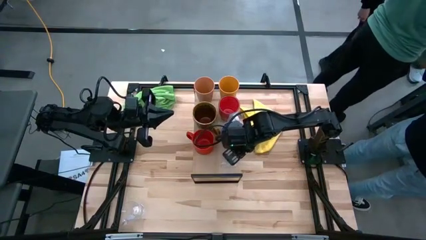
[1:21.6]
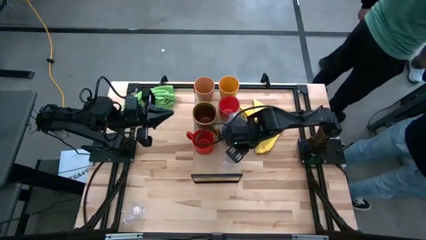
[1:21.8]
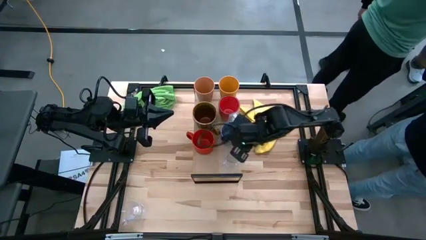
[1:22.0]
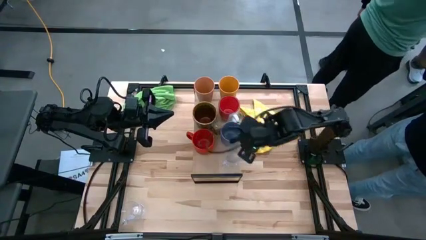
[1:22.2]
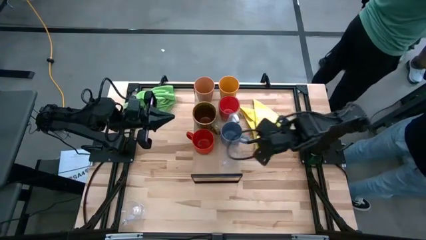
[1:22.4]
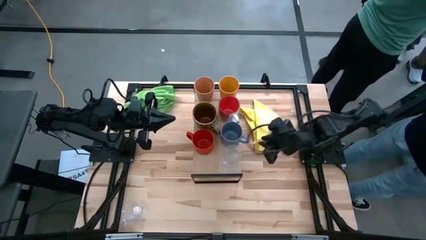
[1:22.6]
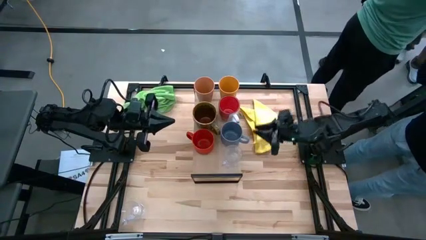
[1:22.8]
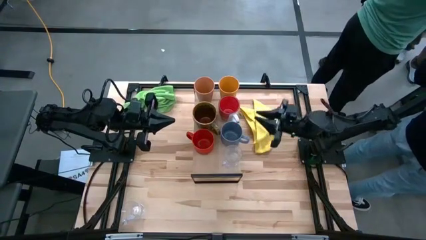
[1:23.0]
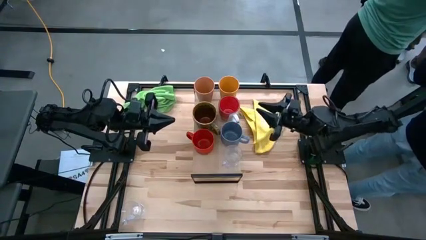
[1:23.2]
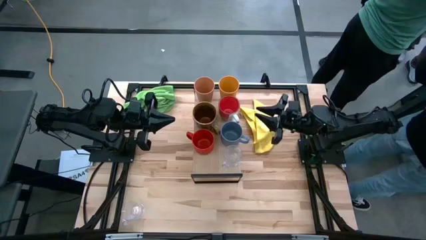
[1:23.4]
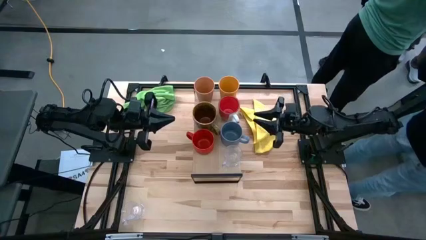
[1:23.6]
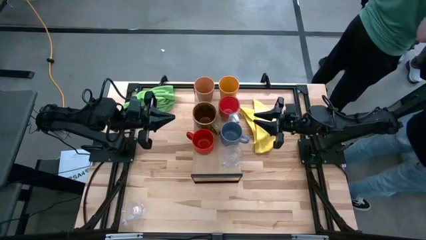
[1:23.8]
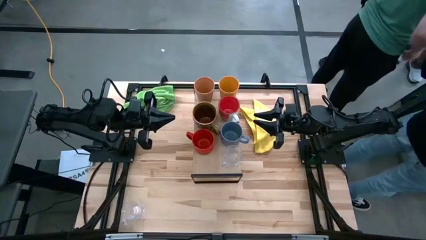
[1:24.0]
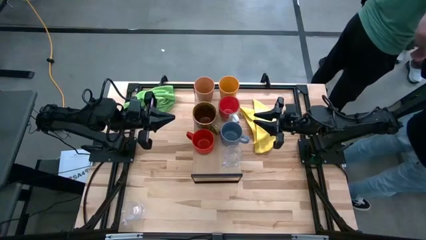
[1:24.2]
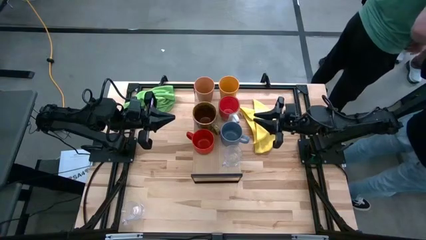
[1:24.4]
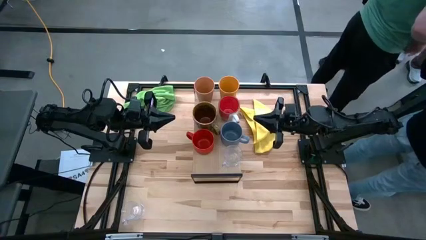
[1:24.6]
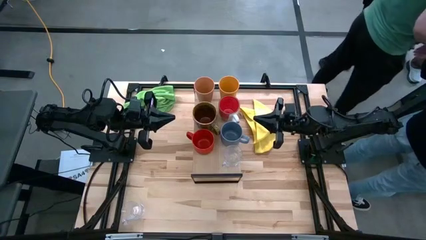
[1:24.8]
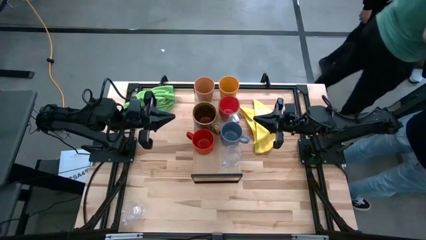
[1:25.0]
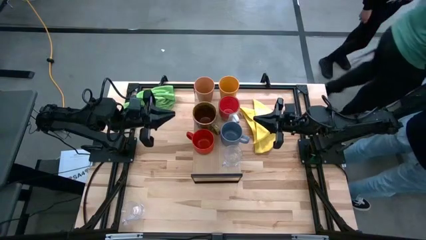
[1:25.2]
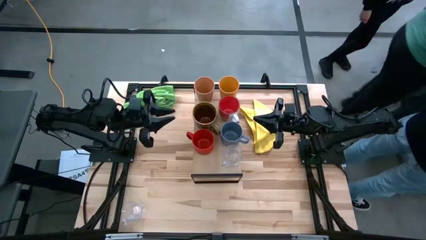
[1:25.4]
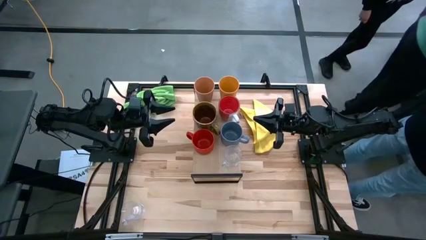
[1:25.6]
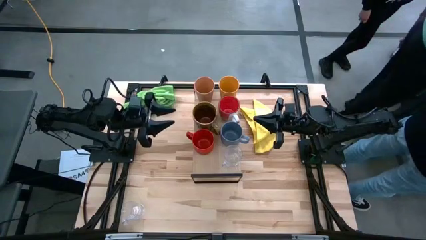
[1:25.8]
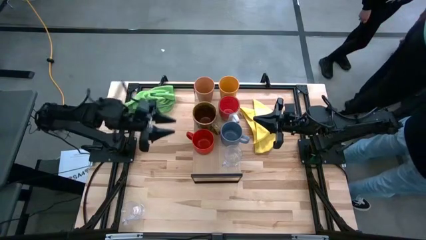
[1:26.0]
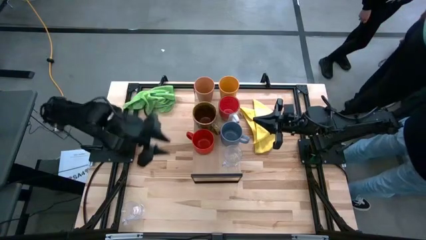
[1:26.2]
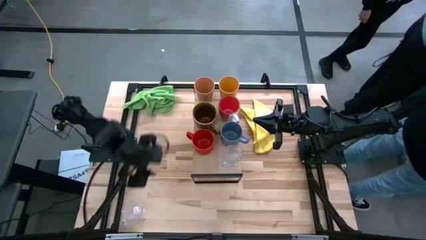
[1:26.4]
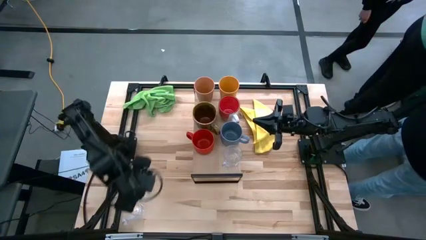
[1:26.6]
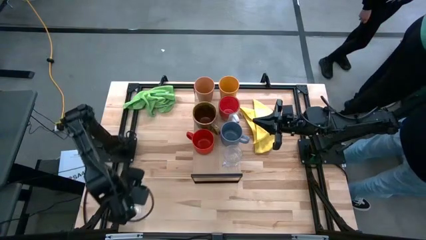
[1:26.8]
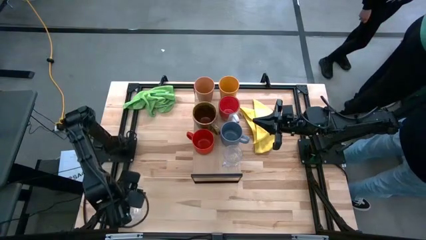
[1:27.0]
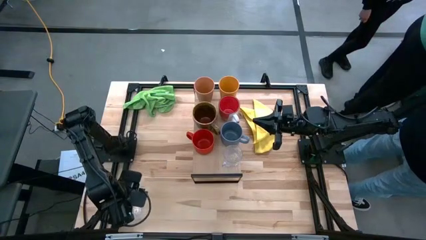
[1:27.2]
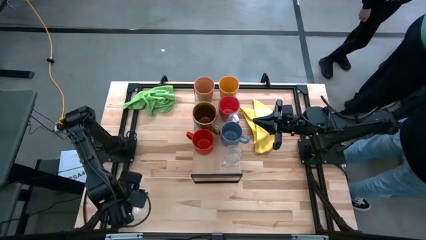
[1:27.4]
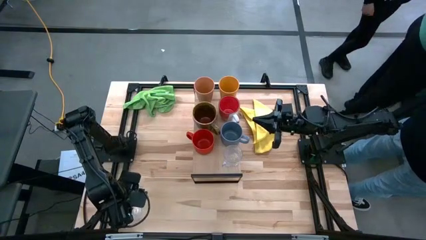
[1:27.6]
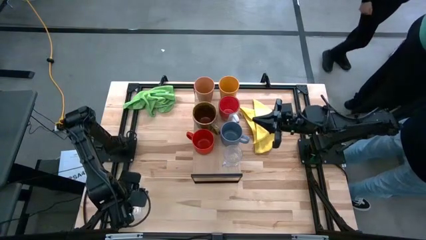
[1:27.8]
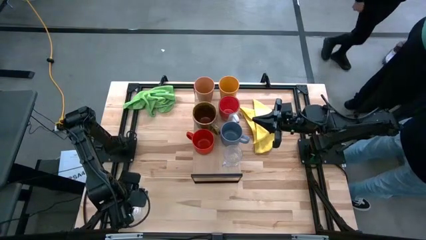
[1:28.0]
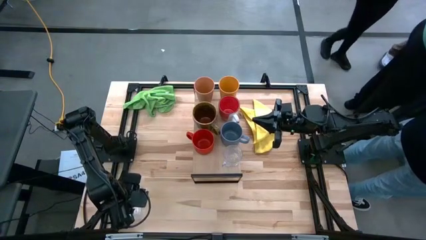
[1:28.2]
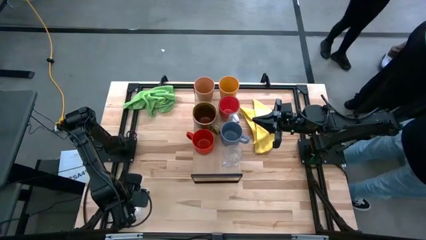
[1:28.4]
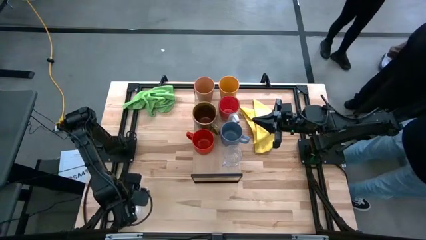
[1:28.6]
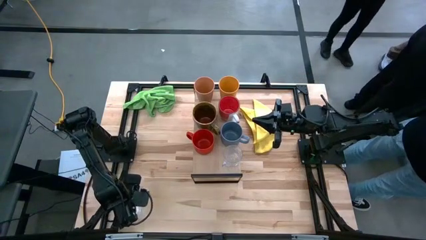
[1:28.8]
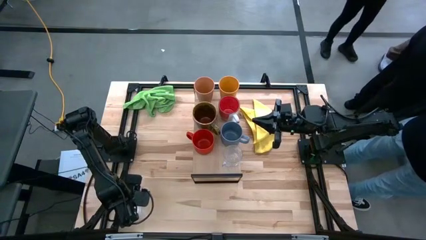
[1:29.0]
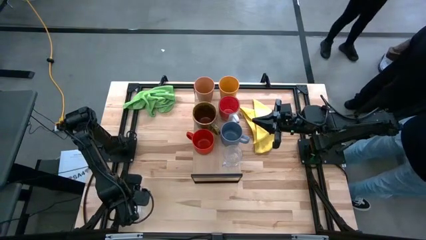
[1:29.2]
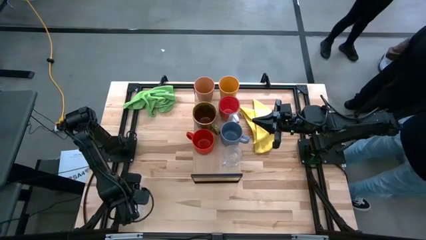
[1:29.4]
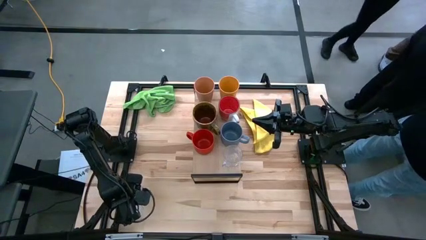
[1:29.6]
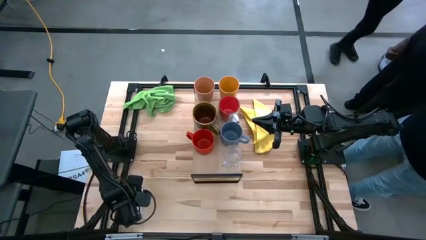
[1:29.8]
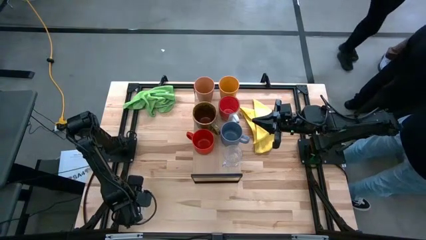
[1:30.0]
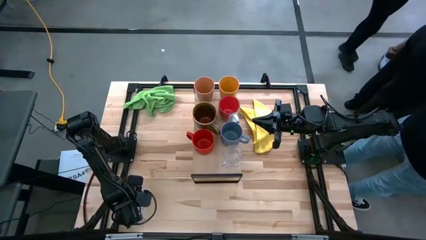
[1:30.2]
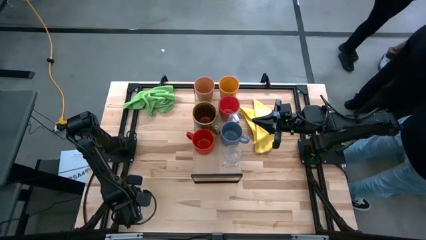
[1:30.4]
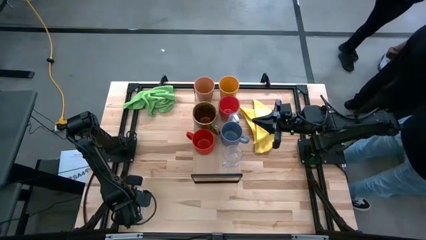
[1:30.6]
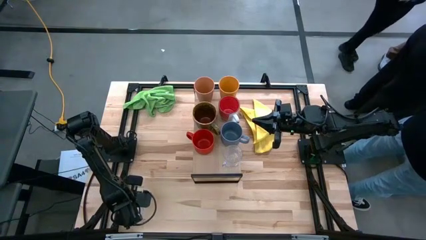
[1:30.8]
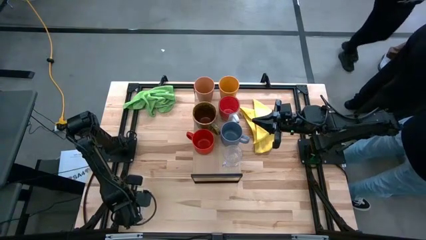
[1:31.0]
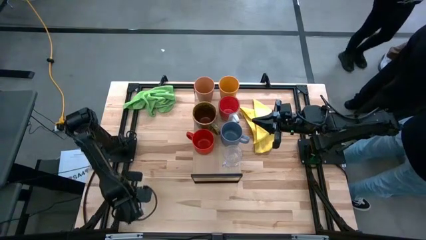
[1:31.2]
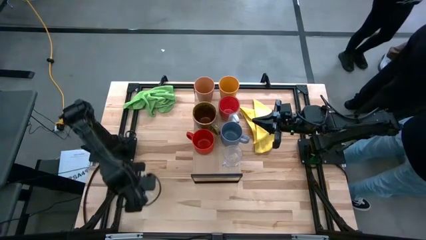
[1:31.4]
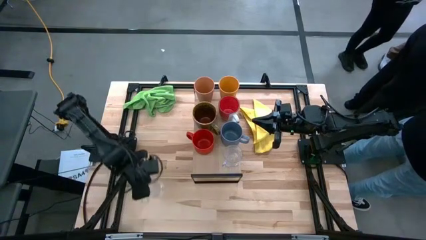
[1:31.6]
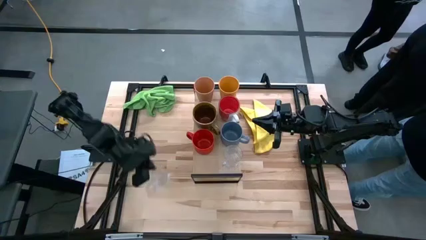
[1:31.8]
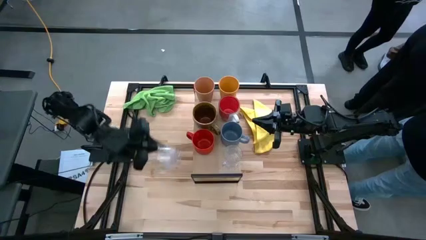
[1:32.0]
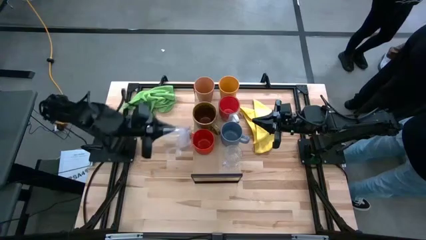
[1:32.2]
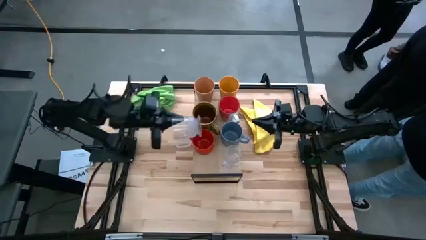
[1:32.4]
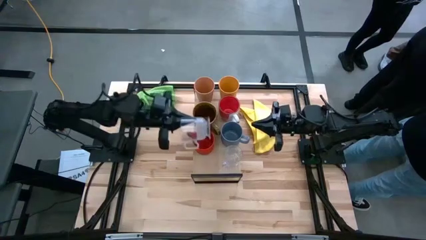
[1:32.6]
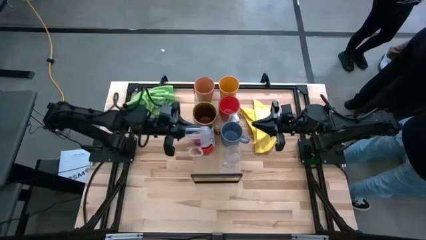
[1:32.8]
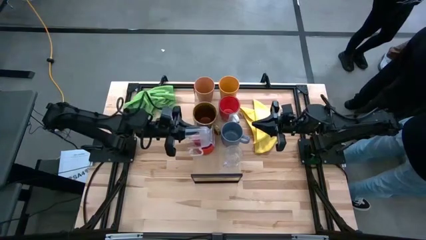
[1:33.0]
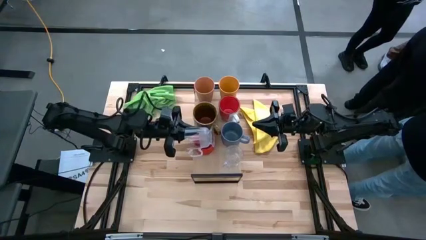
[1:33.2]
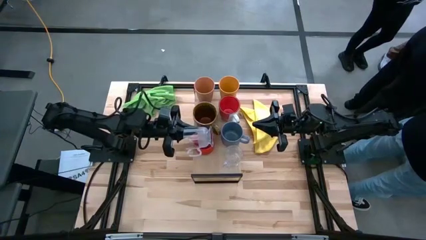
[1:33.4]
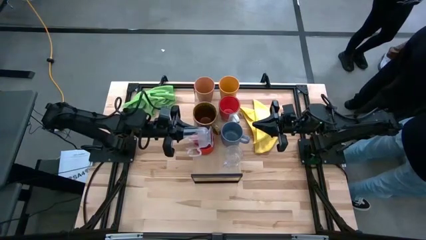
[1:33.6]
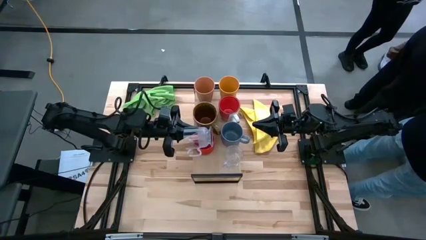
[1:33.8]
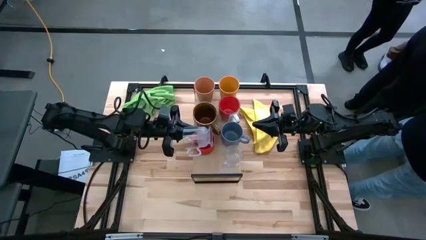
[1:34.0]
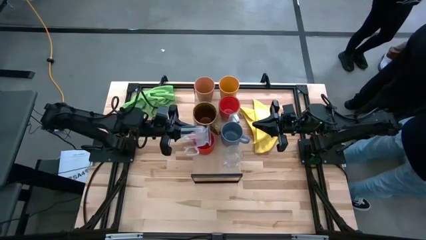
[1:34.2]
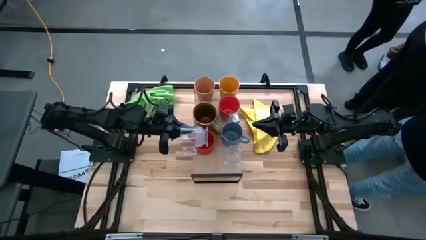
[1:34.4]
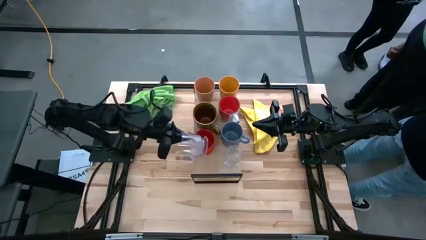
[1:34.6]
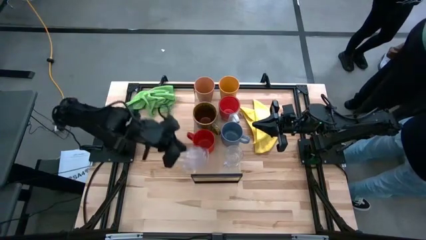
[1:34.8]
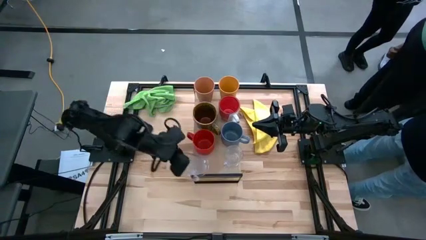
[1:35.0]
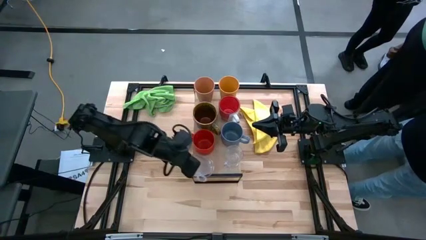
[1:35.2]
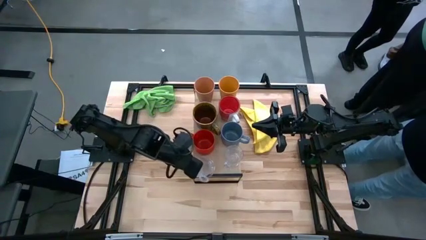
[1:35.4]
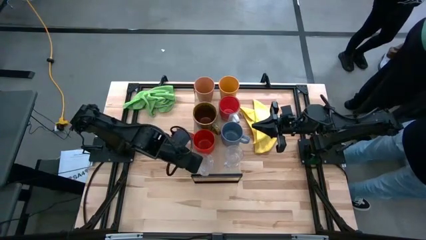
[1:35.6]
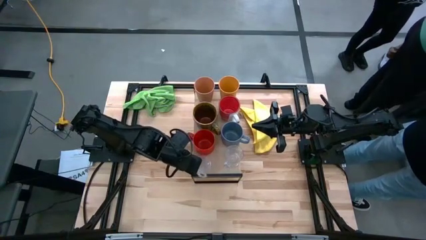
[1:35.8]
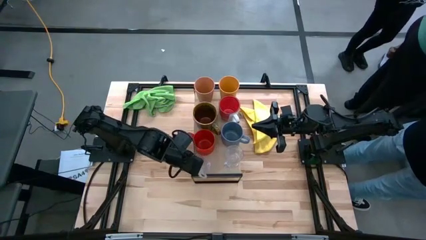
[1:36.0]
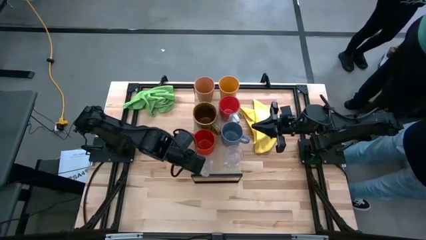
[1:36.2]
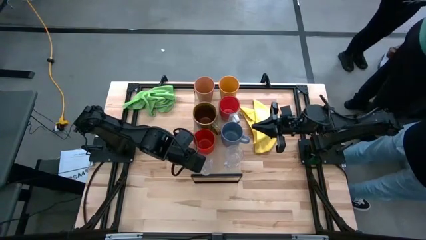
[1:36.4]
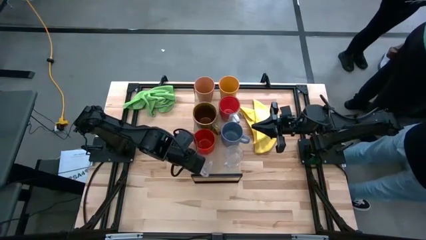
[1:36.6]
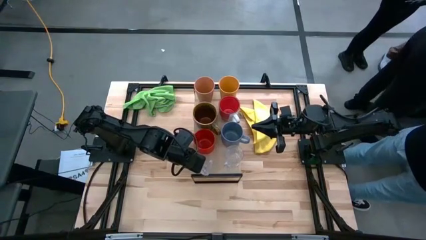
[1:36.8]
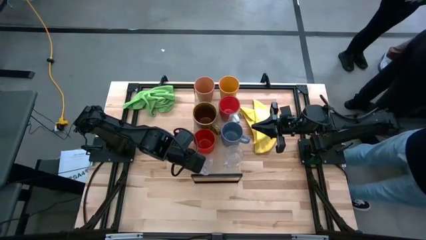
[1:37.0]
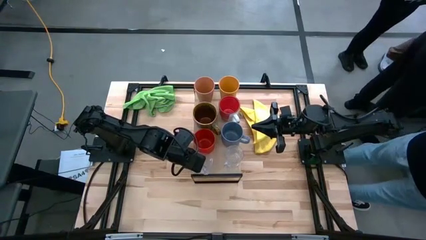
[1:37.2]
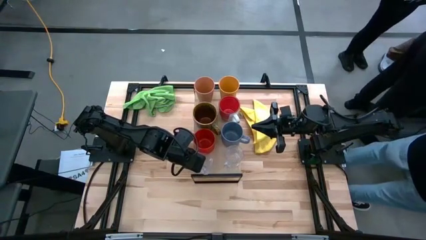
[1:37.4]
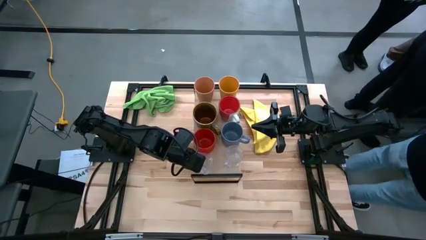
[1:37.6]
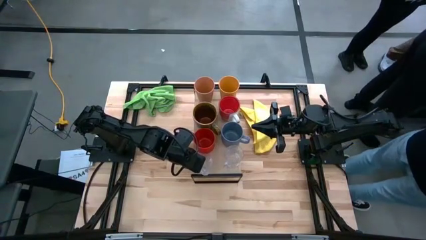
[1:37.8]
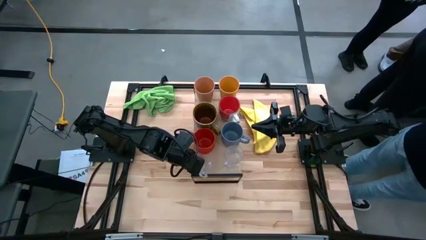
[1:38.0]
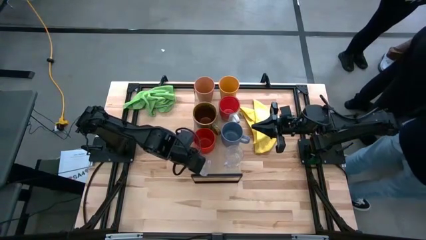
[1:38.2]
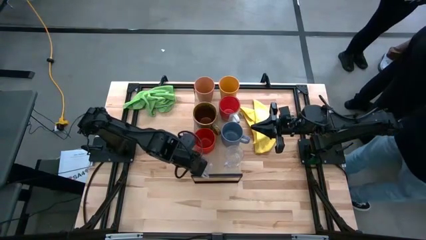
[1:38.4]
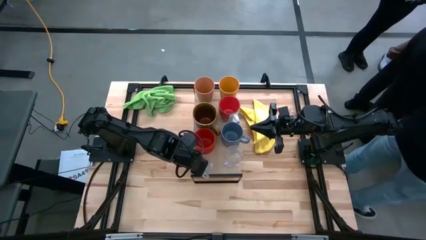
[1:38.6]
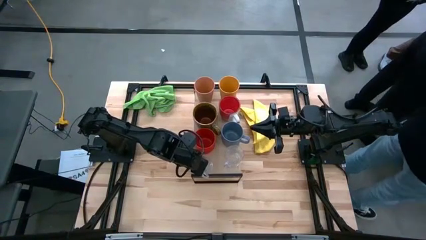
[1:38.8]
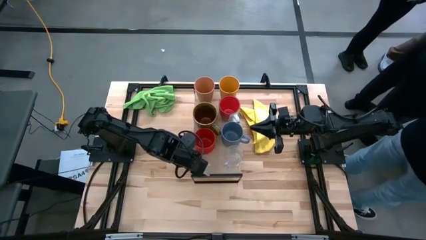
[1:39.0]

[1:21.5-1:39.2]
Task: Stack small to large cups/mugs on shelf
Put the transparent cup on the shelf
